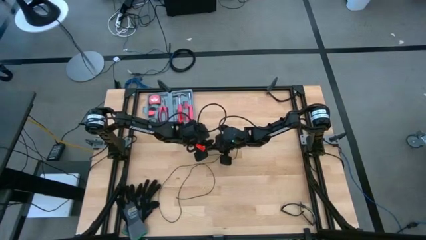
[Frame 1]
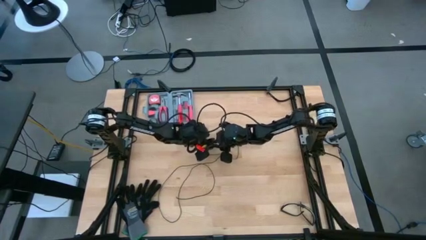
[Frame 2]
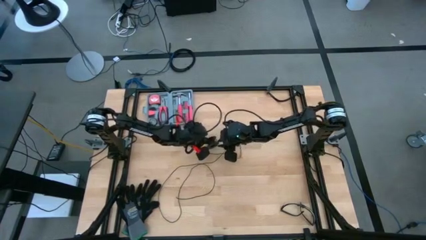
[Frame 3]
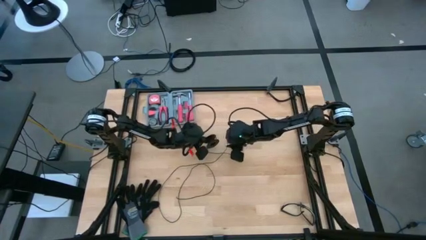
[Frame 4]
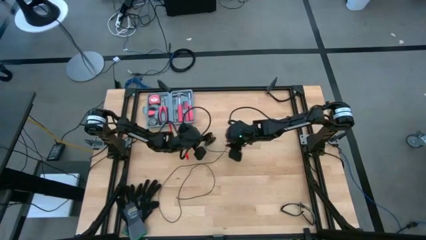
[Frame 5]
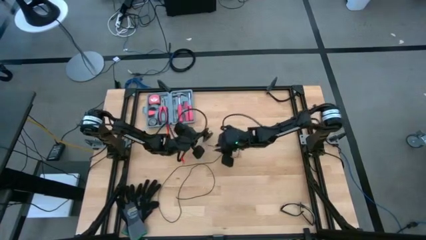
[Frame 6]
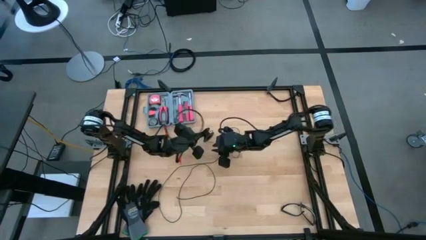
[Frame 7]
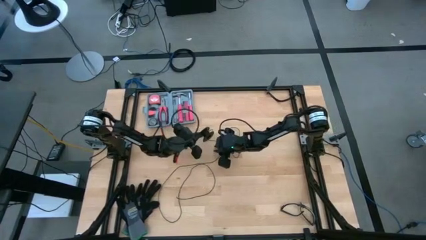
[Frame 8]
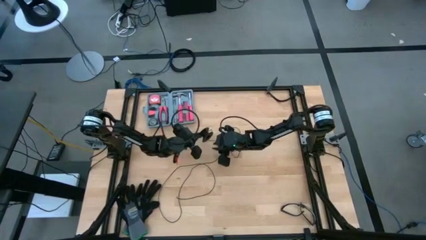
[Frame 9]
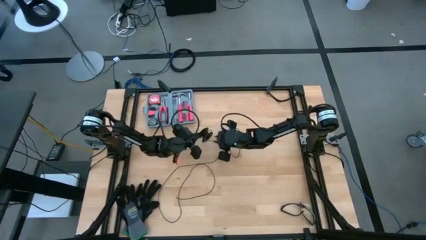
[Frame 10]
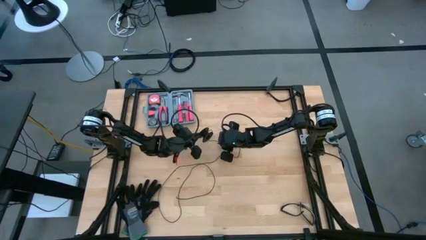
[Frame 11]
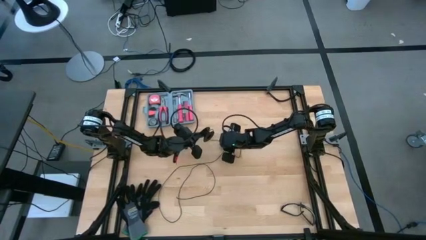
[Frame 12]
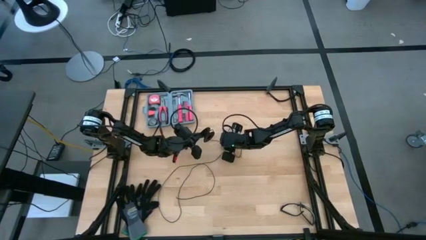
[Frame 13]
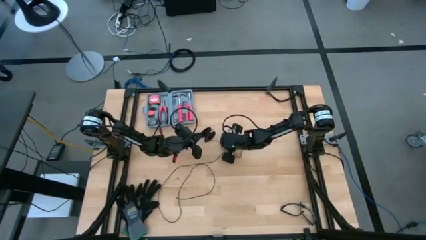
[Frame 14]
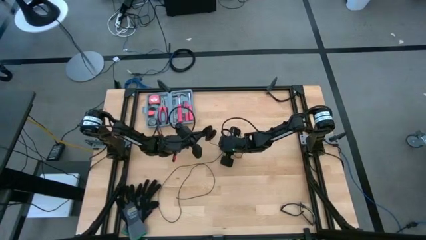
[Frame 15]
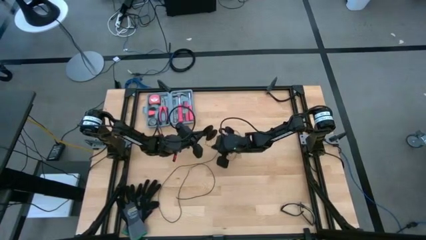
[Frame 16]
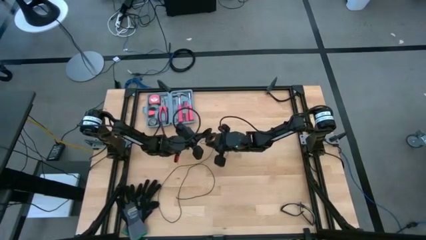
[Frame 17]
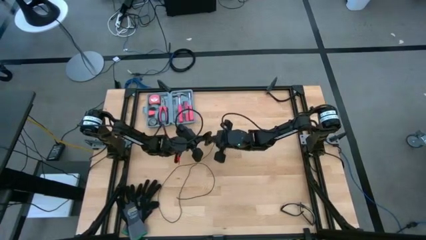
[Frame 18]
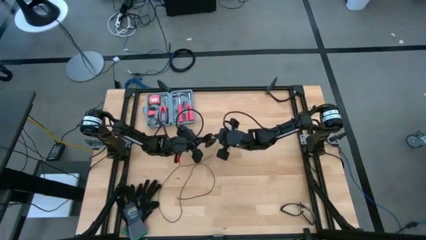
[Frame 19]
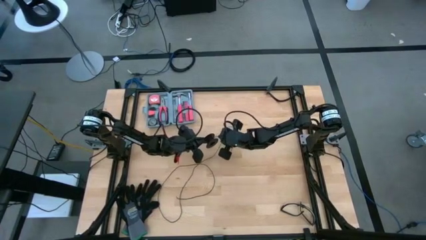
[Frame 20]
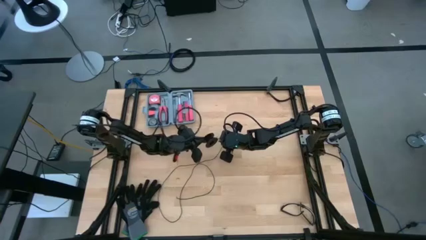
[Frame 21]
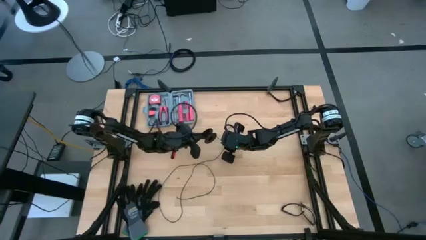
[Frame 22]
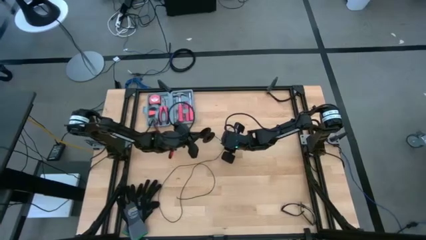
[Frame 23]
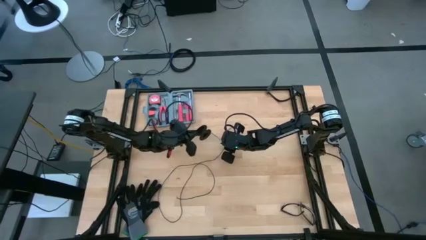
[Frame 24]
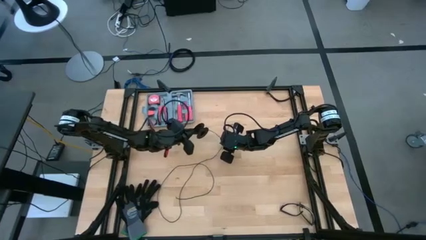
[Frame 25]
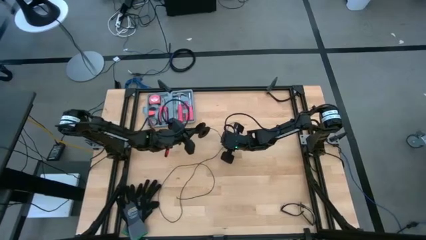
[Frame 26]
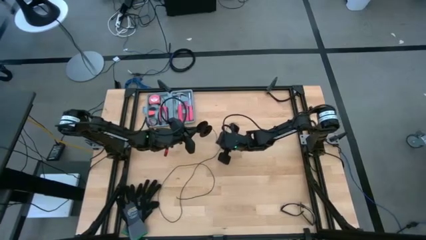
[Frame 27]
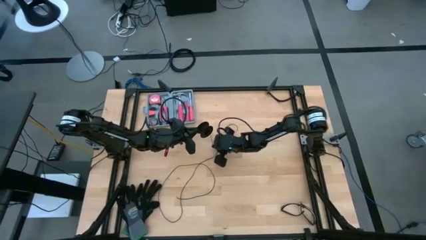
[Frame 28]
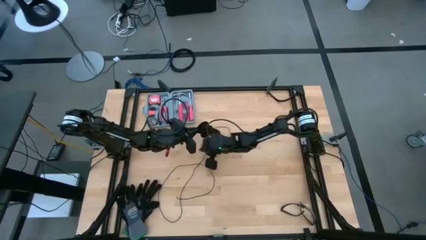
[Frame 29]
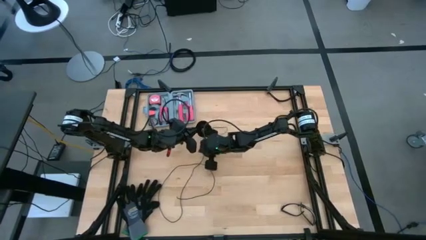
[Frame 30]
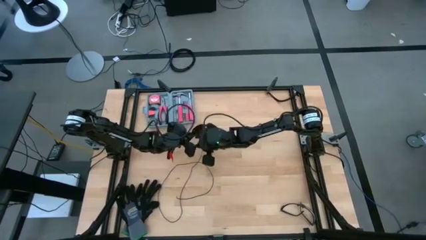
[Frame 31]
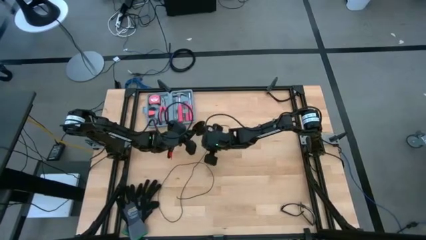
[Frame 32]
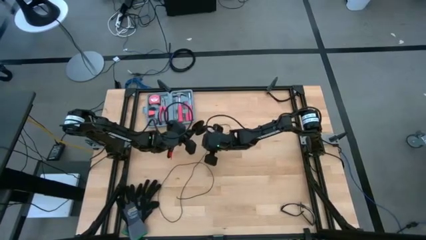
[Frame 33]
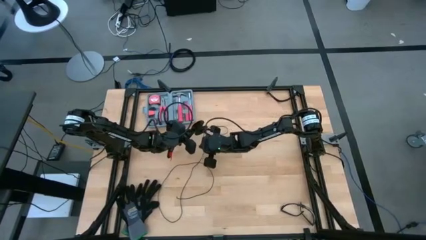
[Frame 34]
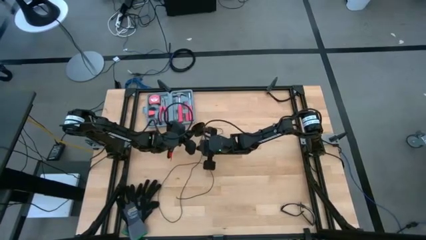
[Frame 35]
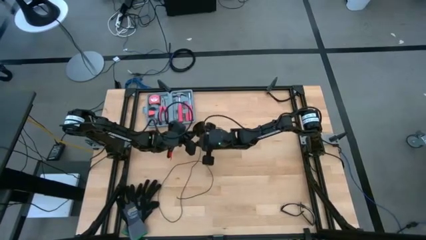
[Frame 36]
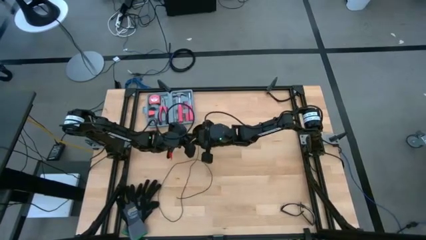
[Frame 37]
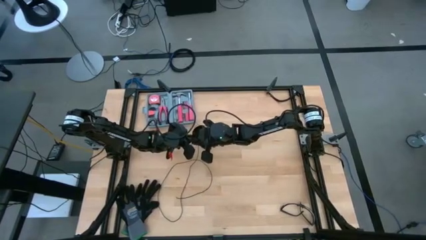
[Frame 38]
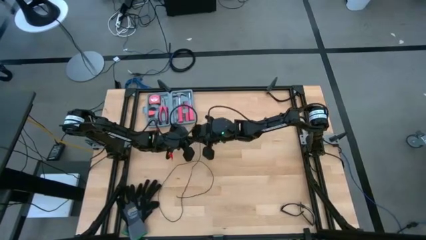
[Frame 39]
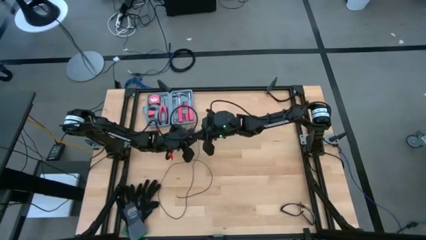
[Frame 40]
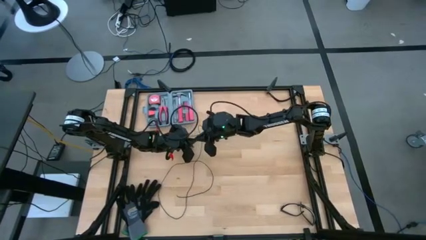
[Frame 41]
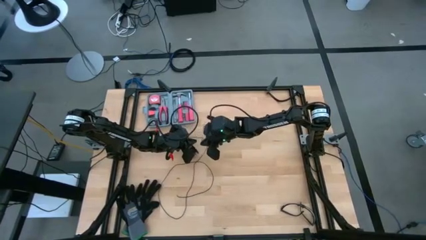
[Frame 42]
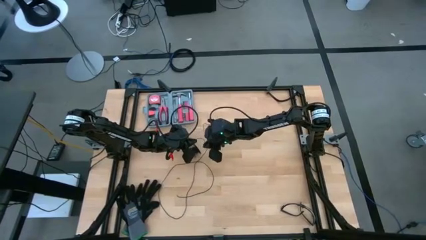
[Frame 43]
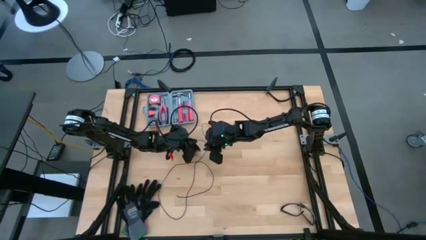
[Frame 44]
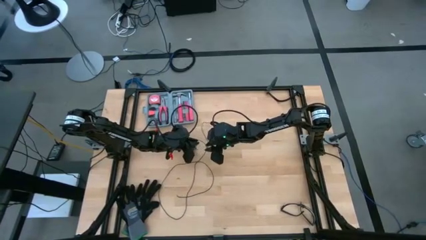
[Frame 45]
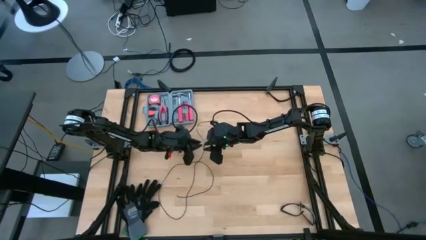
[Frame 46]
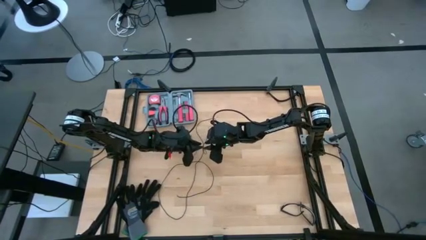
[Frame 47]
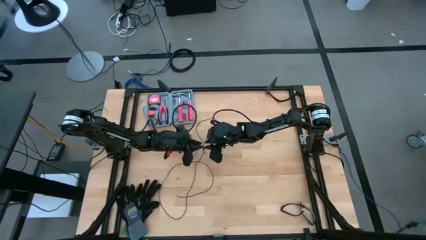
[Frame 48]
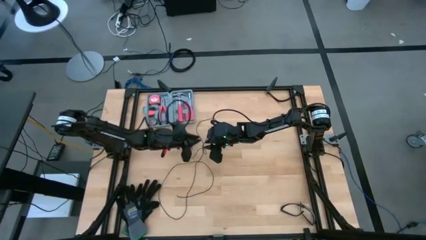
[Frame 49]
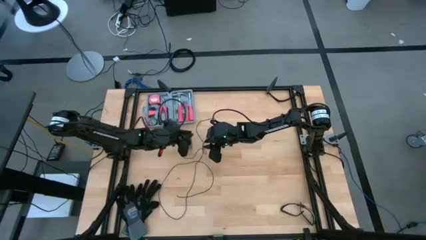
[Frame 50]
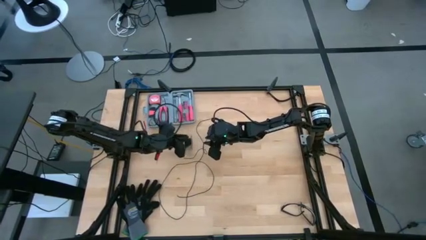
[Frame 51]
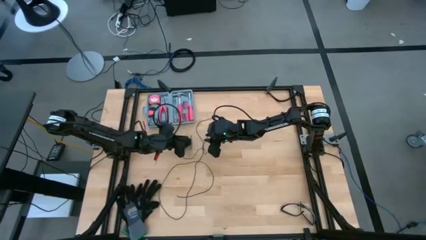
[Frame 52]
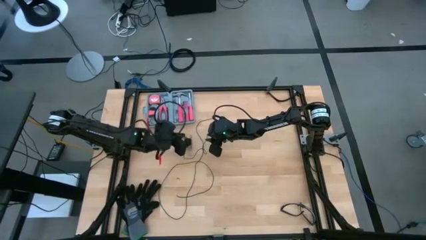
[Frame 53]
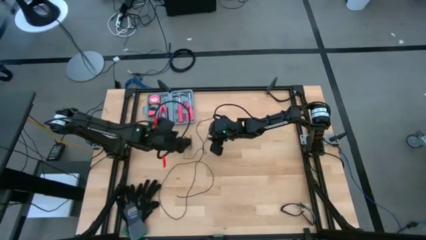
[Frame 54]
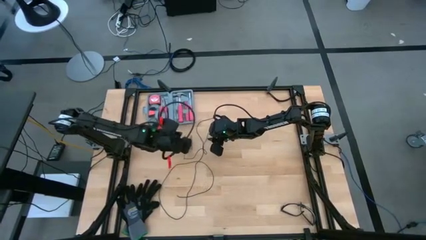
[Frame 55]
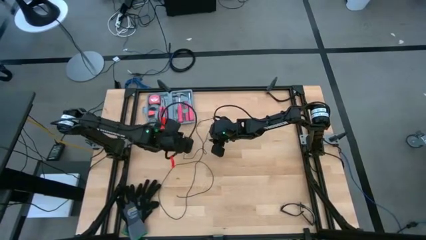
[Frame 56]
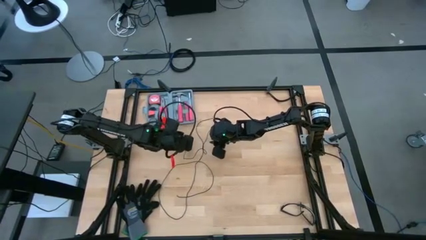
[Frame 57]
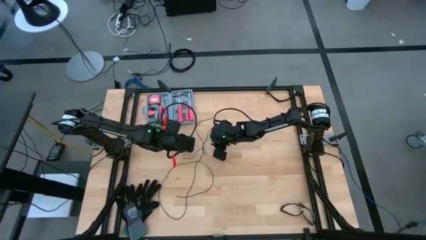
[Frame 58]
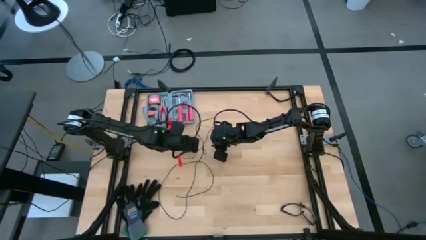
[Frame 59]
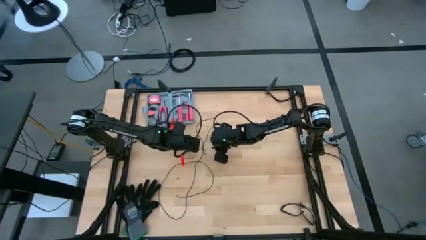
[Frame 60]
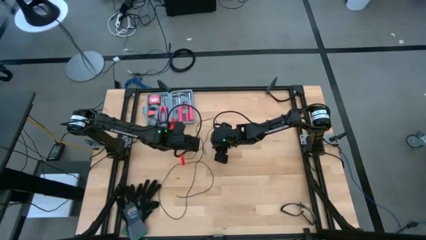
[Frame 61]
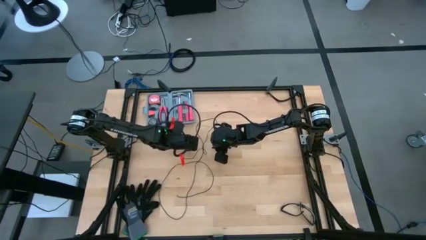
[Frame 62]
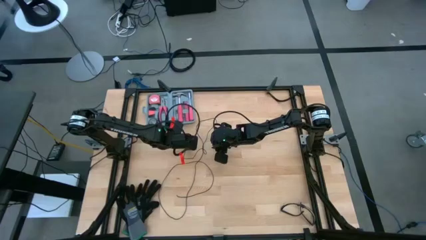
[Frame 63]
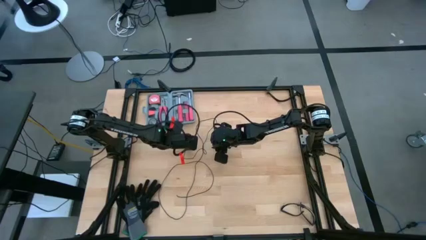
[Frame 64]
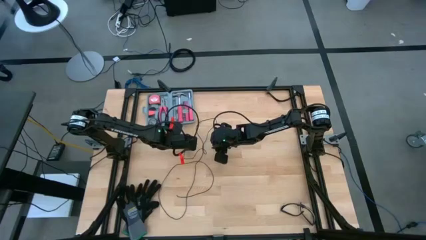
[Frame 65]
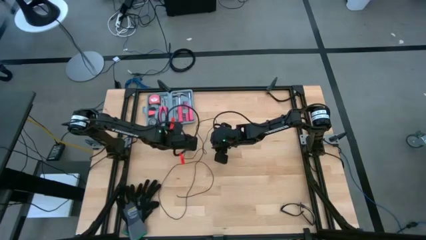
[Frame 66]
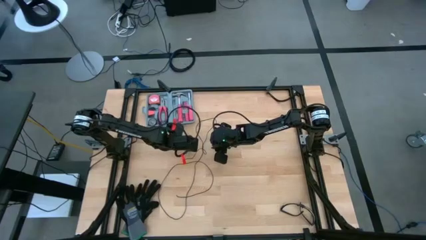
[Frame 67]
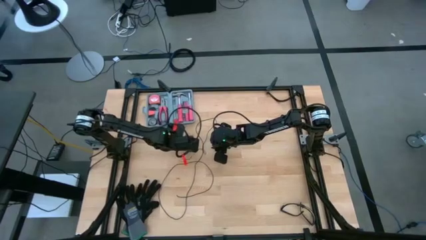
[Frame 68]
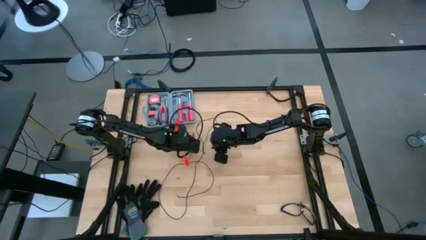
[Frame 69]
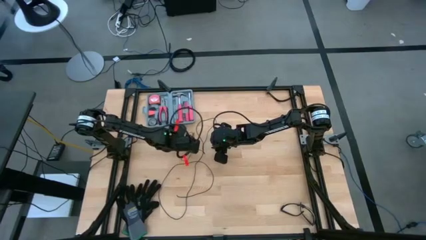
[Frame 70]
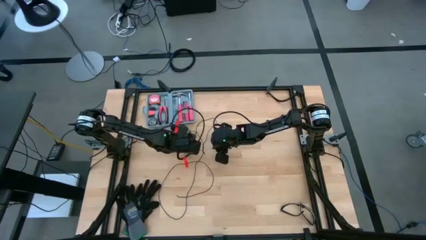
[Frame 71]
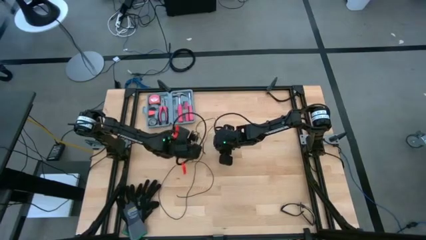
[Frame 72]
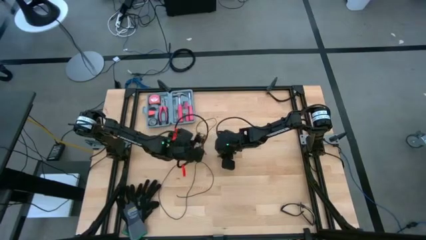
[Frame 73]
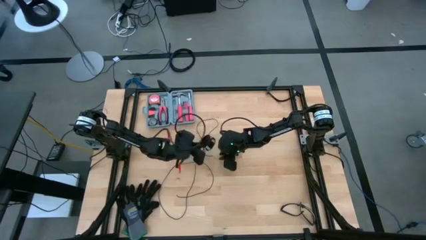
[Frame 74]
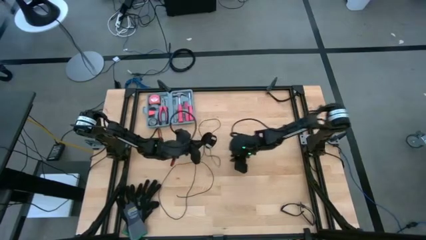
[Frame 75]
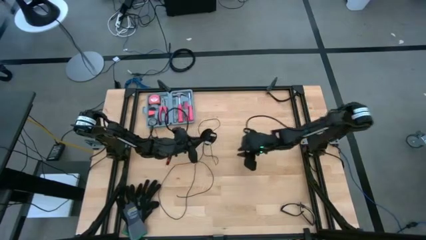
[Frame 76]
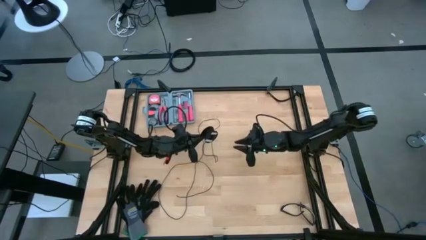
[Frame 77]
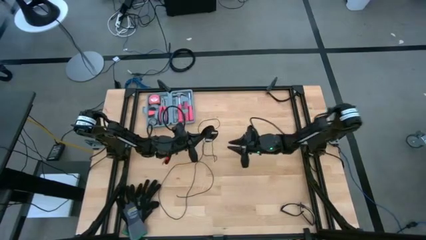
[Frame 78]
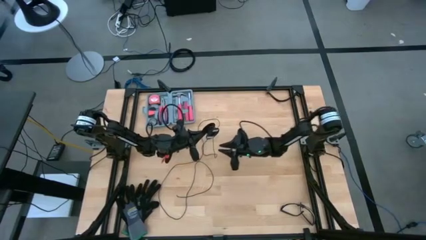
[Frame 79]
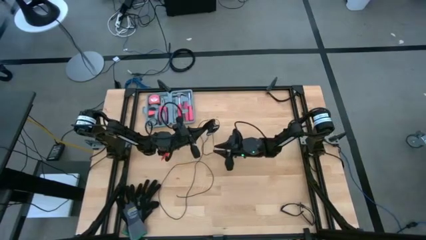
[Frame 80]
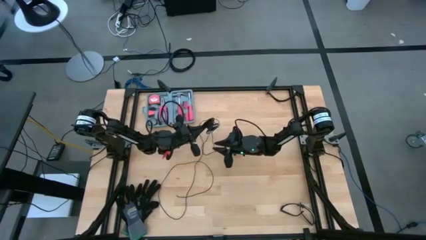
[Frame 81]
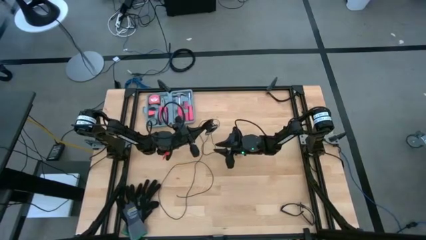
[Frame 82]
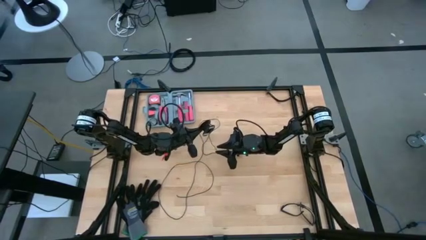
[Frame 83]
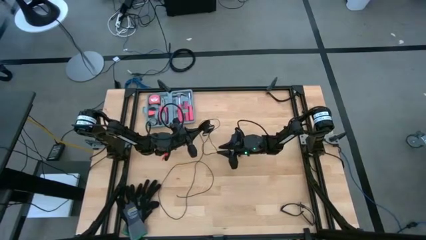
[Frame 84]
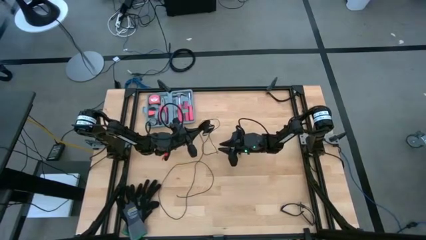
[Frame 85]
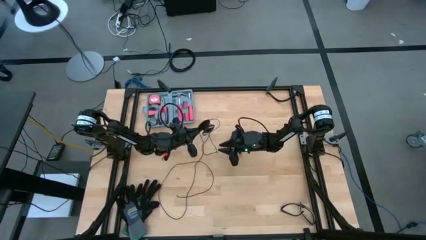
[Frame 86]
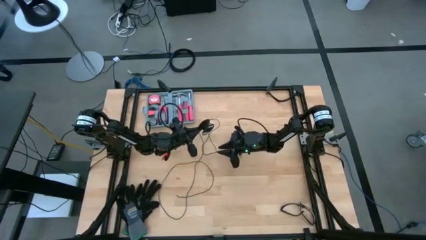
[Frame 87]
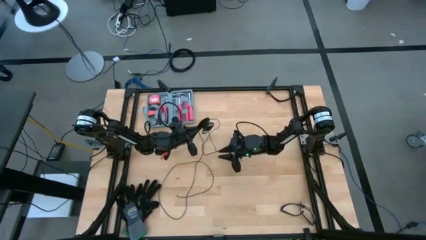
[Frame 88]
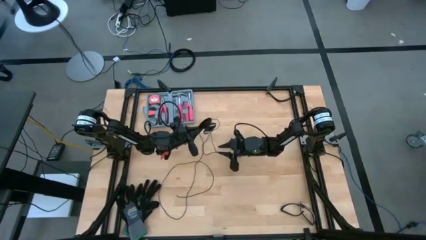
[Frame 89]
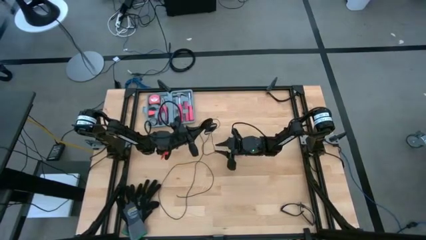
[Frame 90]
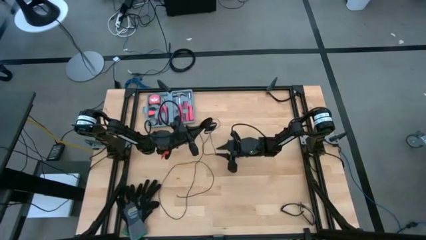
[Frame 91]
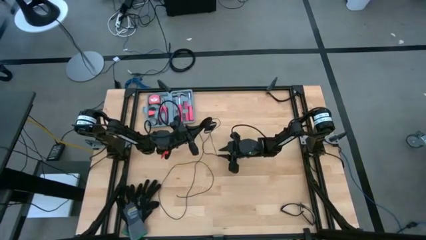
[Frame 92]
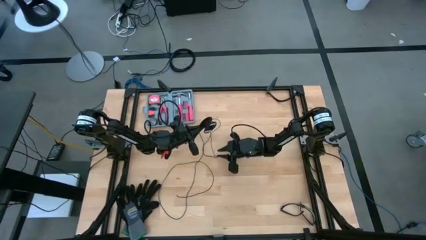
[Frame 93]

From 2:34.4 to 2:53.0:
Task: Coil cords
Coil the black wire onto the spool
